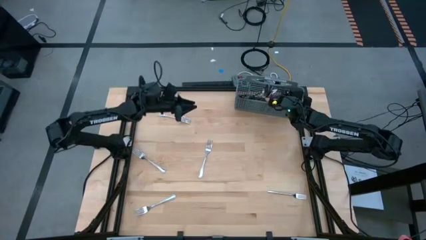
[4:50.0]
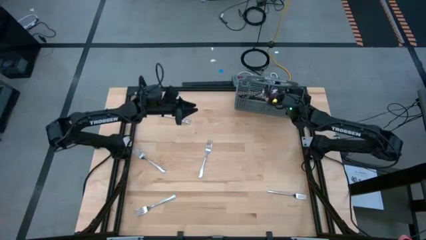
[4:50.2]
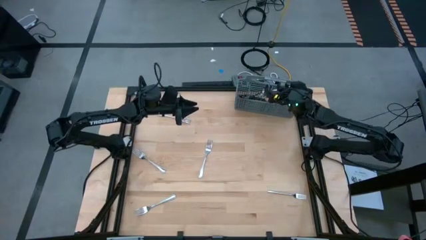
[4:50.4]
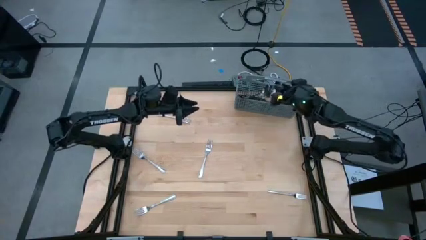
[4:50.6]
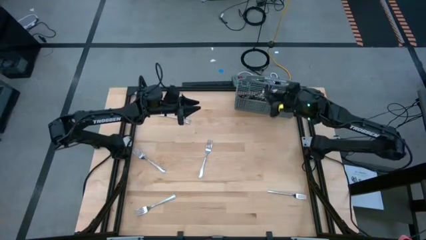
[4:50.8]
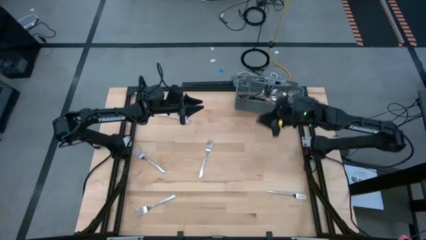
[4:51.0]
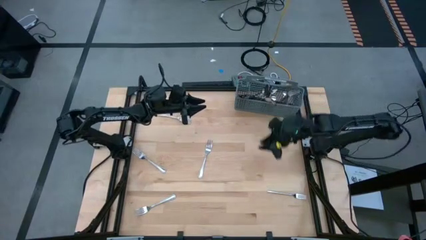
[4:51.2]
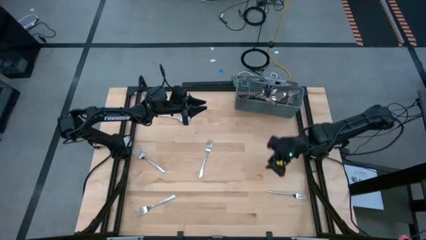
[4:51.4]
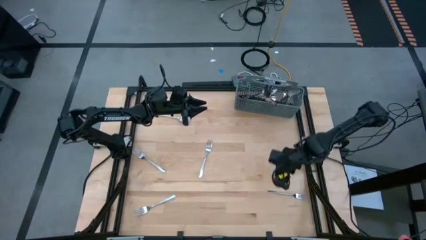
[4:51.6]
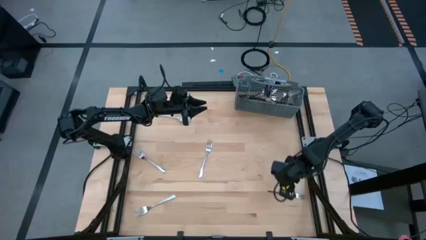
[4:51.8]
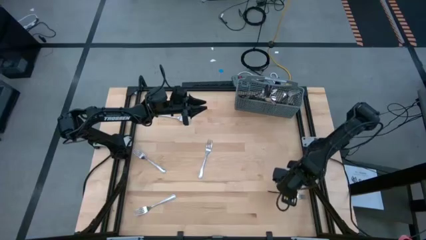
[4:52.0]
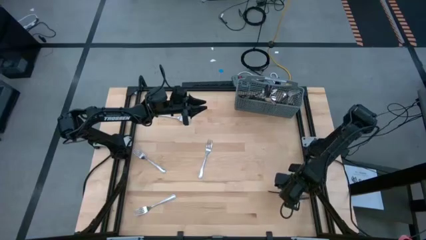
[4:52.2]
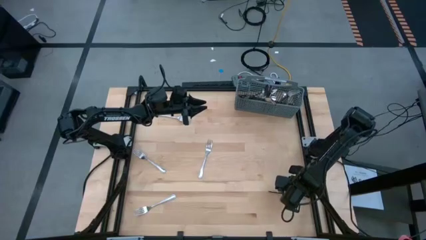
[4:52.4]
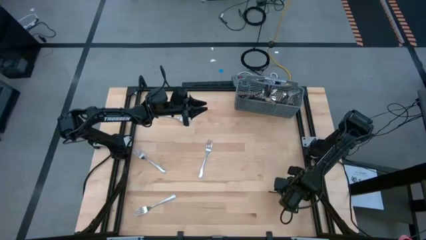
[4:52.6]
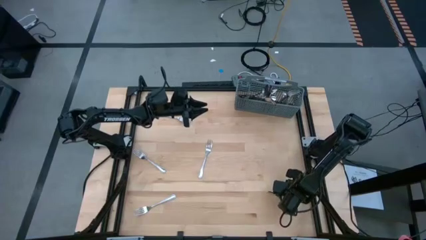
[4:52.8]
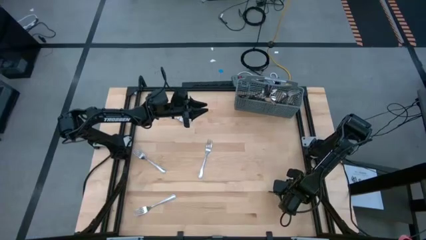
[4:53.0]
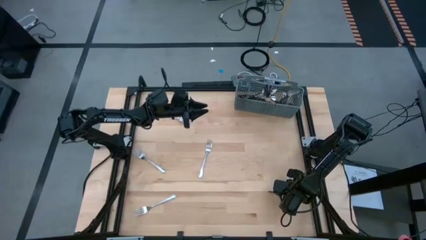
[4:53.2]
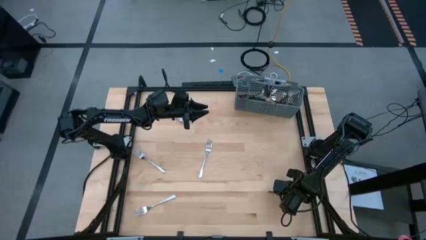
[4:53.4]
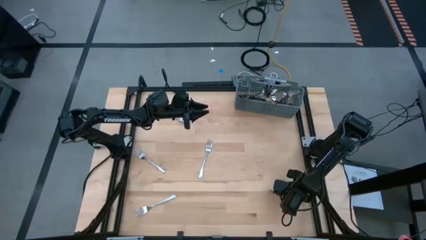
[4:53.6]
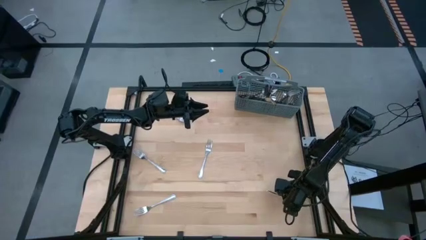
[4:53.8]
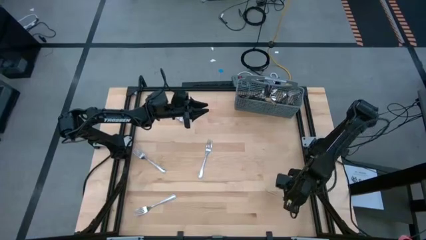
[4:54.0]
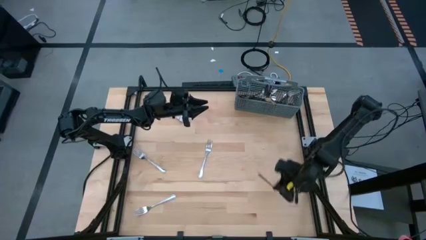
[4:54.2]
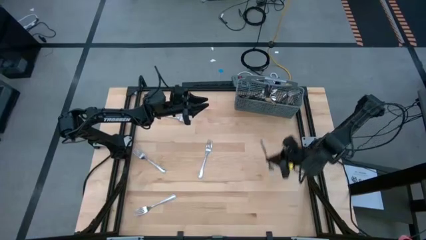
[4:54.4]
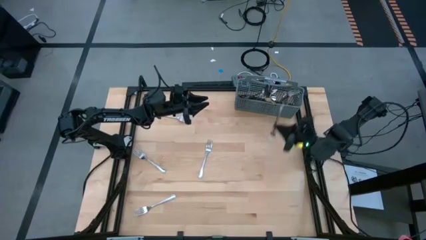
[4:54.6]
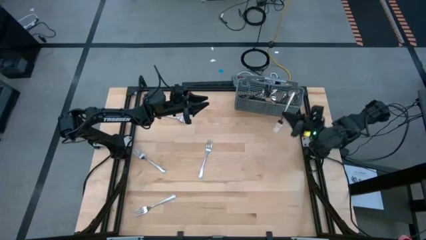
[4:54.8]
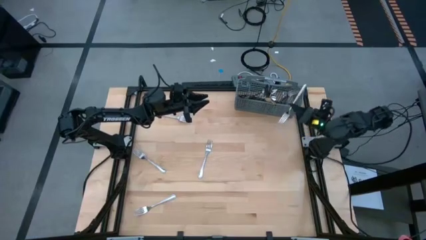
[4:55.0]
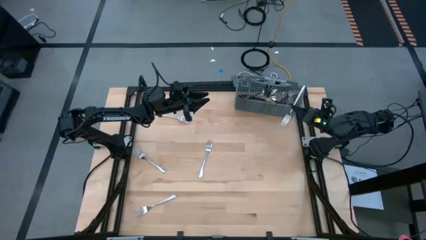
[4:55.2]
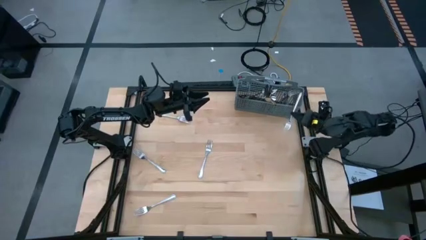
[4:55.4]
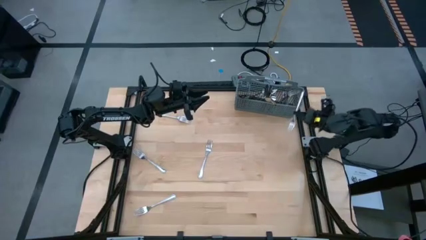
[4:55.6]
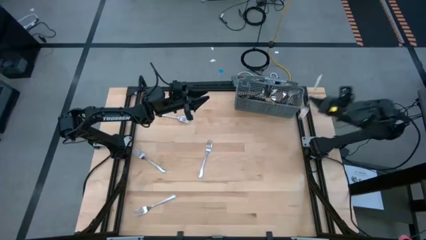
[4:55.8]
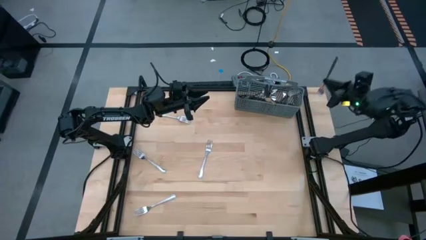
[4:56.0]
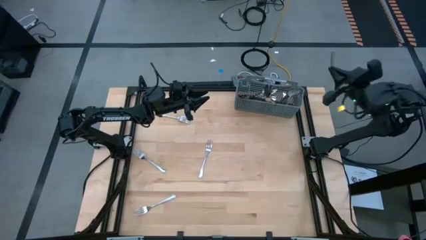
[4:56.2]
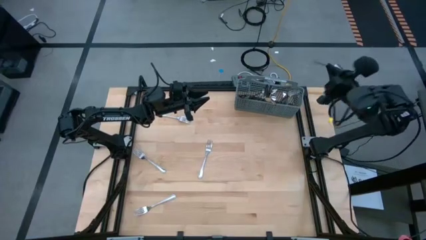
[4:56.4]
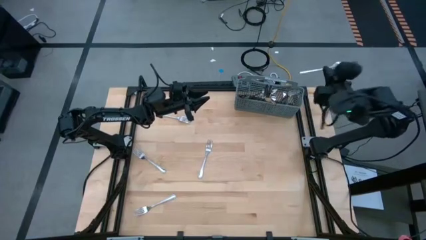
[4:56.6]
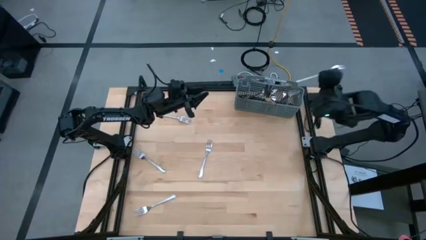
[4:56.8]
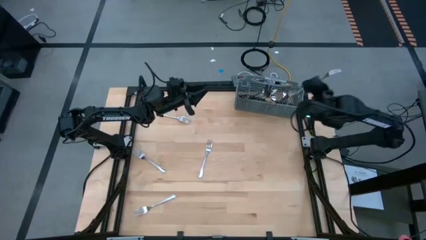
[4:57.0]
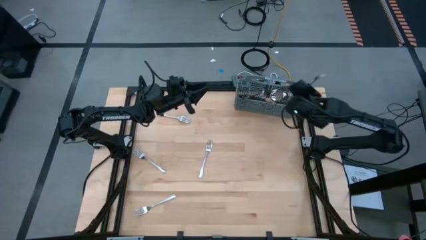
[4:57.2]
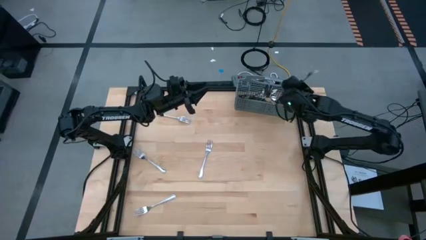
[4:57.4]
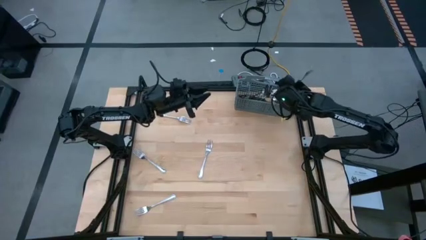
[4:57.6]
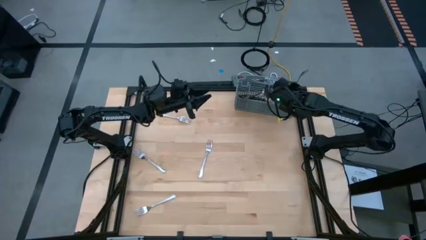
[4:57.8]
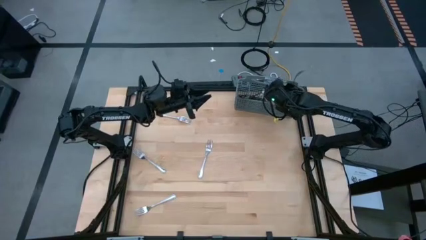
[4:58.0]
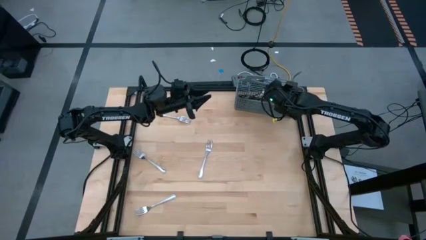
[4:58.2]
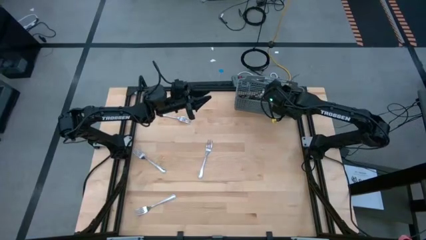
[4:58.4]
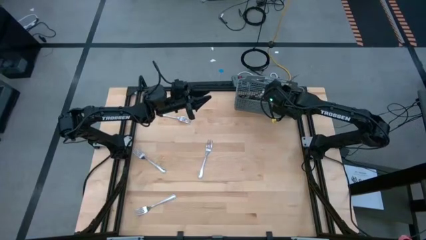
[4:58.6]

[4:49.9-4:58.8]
Task: Sort silverware
Put the silver spoon into the silverware basket

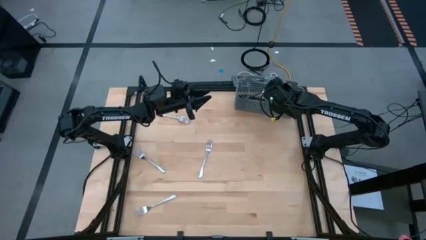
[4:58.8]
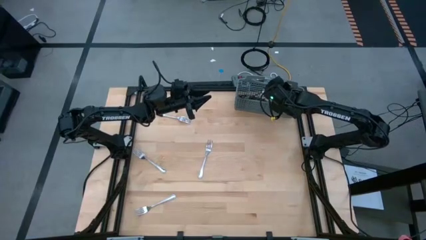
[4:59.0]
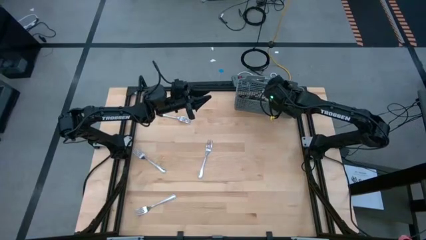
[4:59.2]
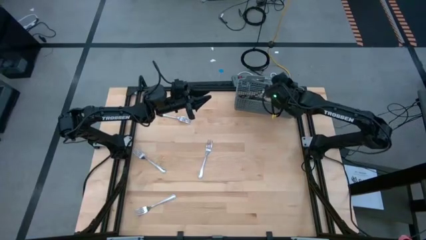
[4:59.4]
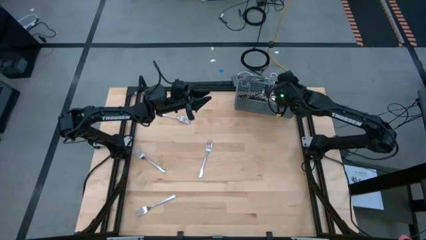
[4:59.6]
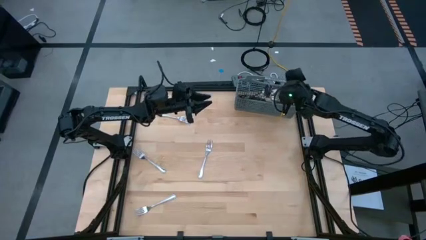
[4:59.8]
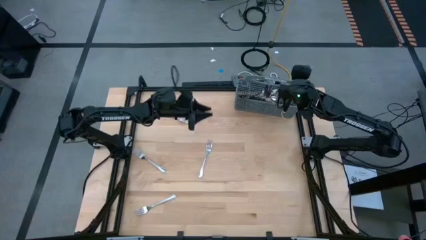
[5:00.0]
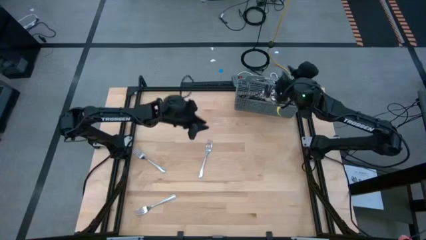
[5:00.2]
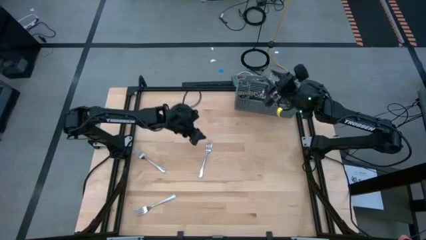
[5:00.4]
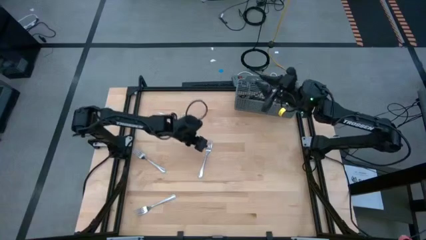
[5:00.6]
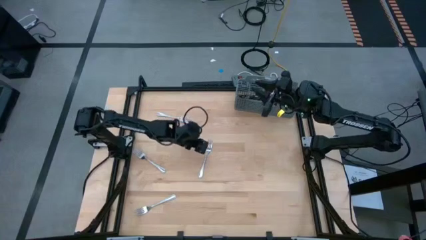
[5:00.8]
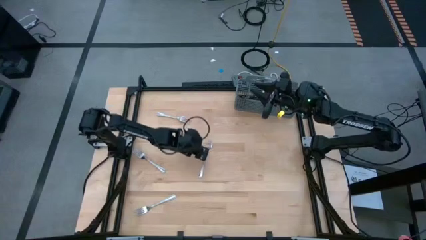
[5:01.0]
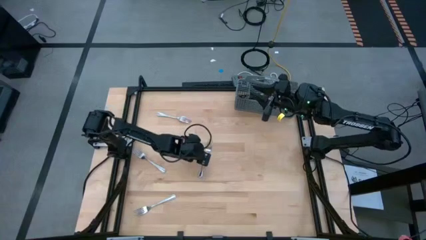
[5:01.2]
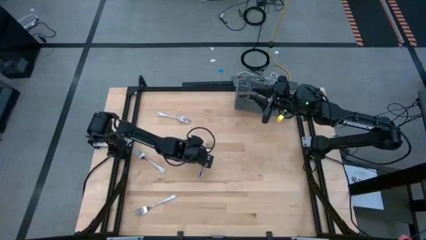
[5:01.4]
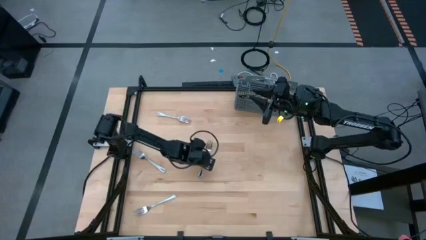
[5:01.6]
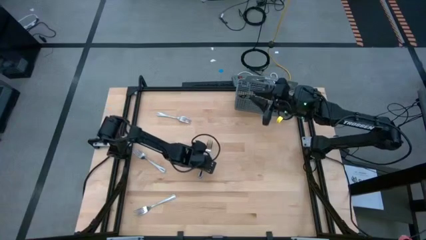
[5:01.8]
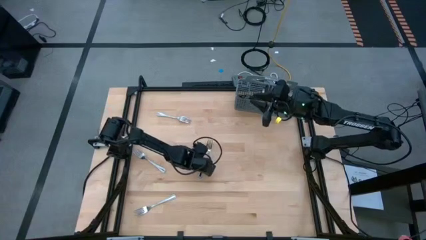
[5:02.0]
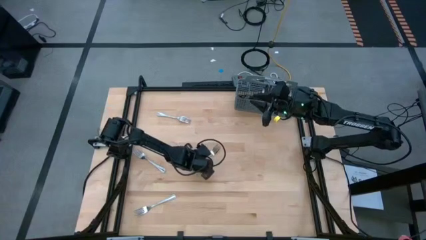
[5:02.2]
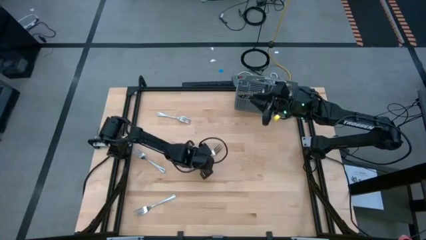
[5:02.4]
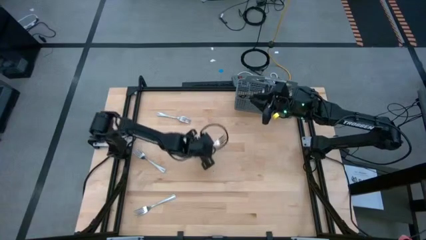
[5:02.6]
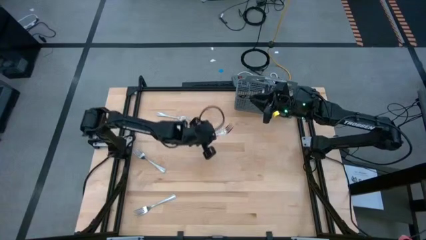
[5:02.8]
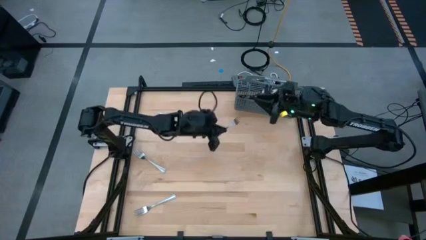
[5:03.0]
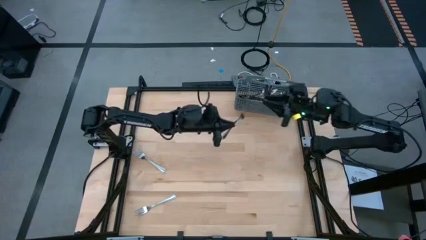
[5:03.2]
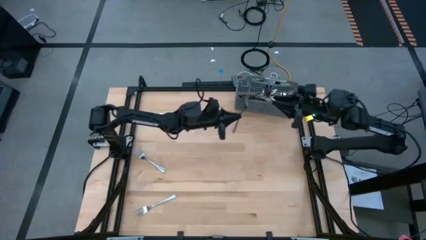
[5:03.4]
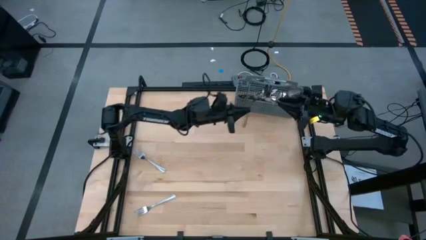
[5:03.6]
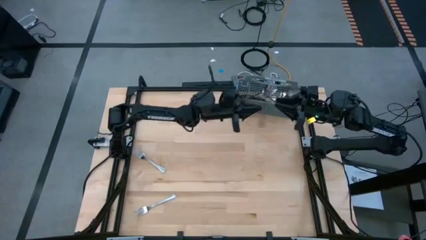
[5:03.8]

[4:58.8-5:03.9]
Put the silver spoon into the silverware basket

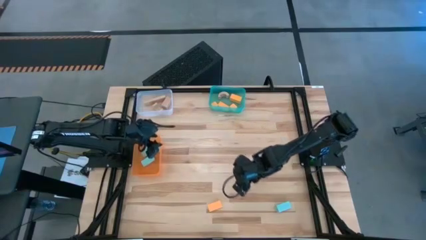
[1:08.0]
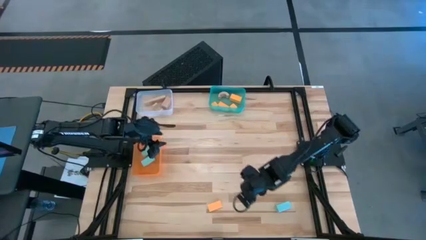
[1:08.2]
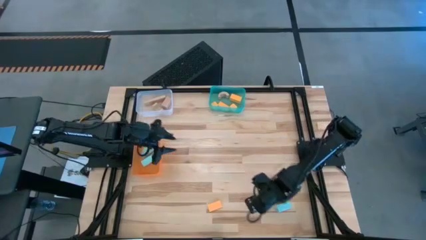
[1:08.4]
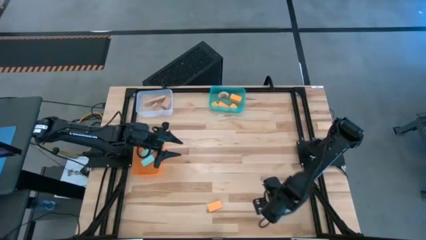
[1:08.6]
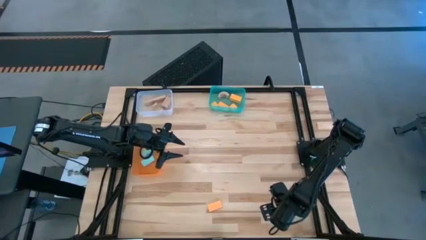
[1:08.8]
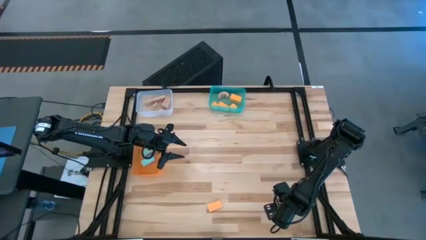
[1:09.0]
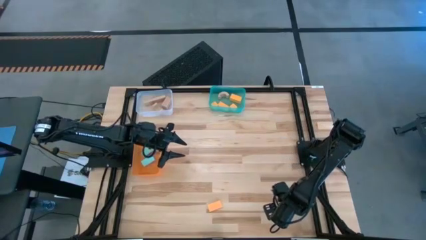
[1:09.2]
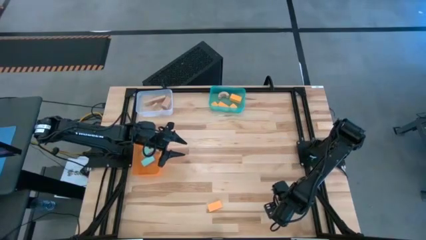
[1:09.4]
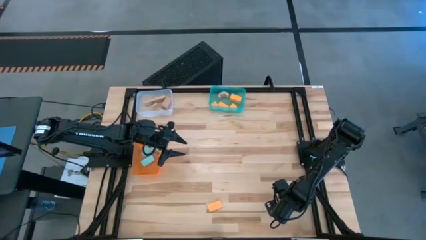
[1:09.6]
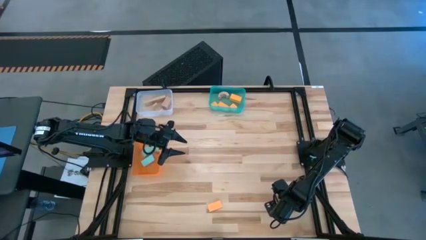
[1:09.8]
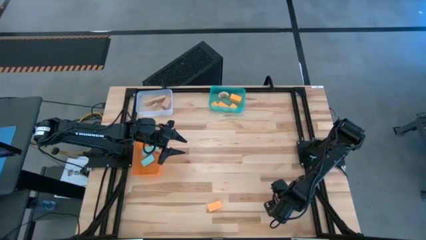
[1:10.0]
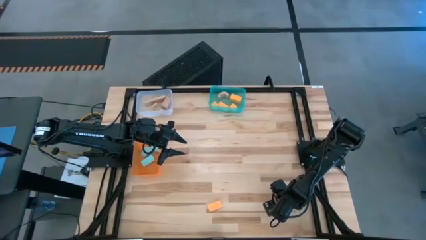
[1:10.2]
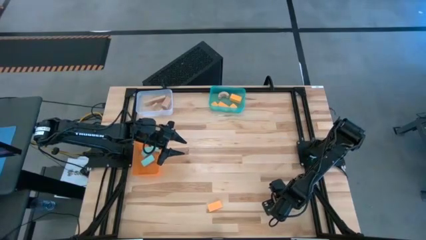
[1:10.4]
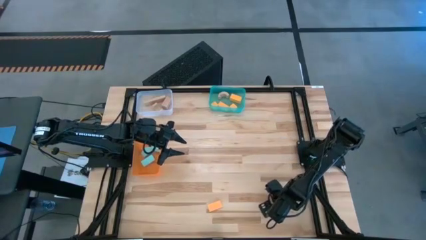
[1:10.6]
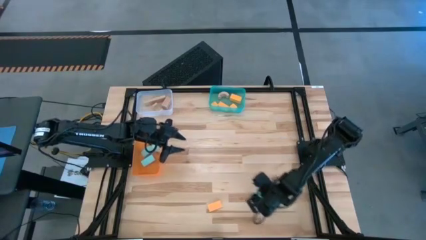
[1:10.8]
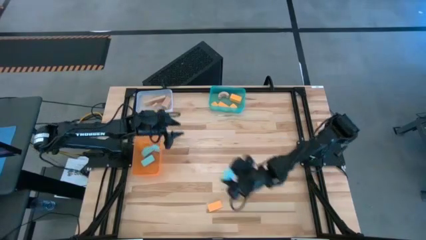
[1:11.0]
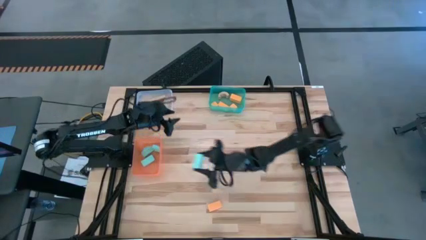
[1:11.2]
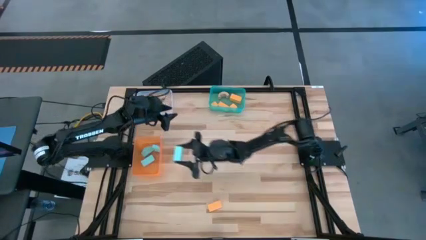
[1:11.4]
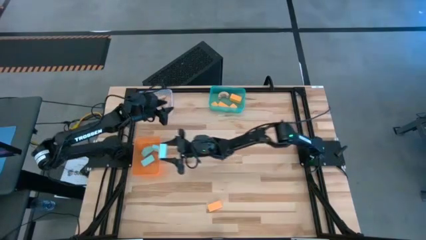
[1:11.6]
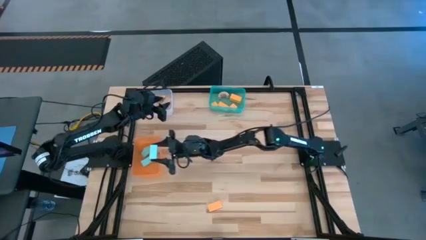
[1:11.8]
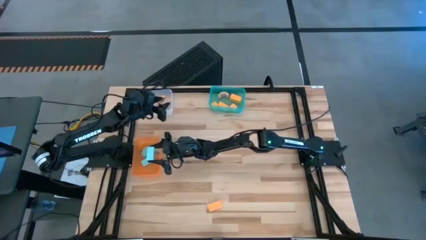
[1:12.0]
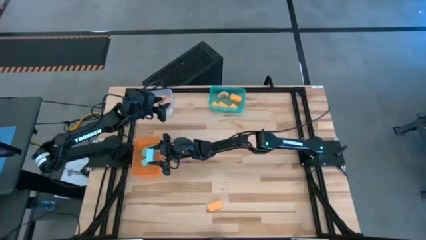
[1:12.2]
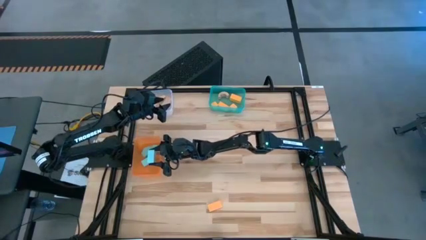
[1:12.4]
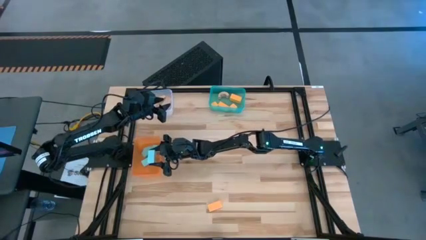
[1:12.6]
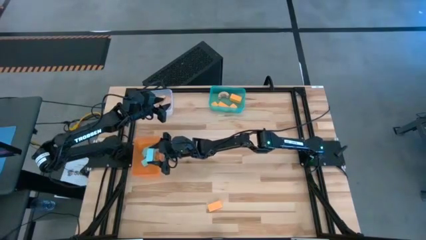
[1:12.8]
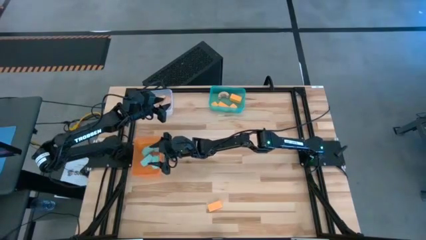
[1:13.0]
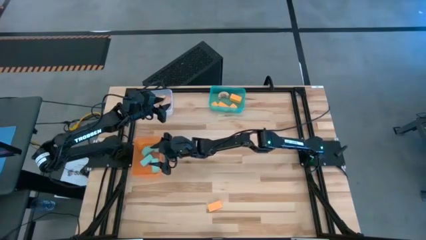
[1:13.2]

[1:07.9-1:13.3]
Task: Sort & place blocks by color
Put the blue block into the orange bin
